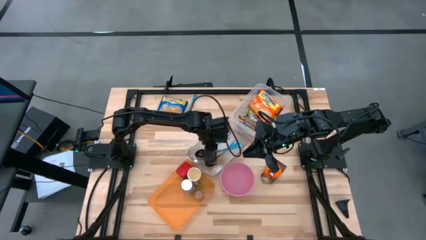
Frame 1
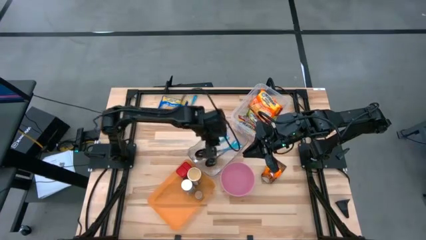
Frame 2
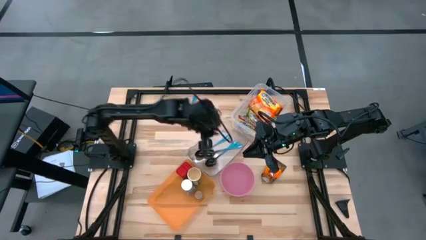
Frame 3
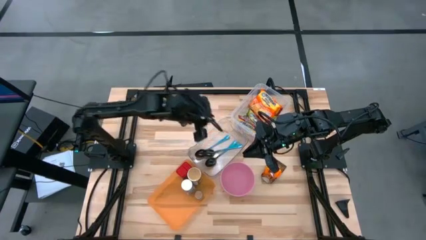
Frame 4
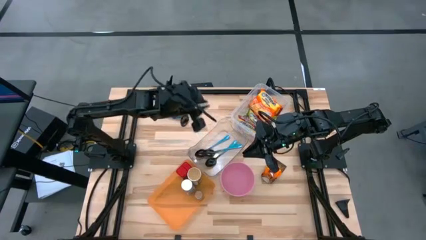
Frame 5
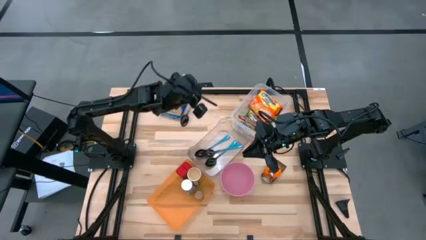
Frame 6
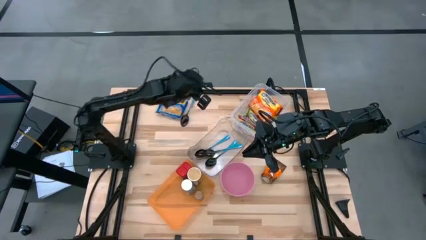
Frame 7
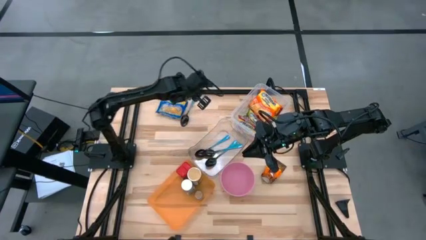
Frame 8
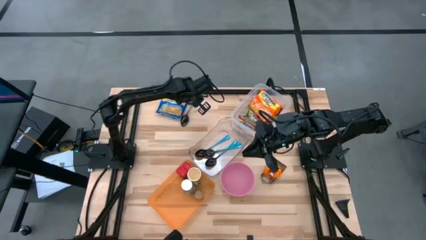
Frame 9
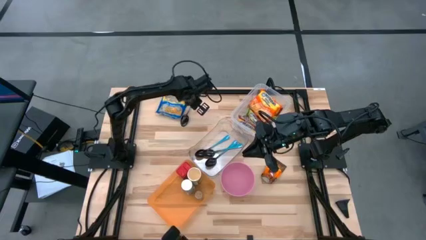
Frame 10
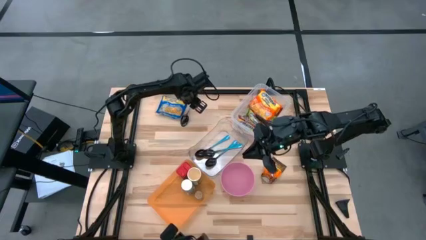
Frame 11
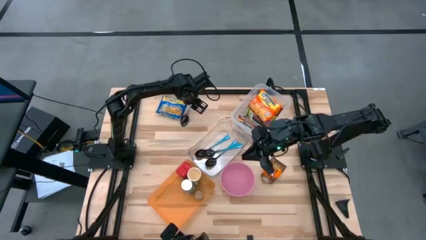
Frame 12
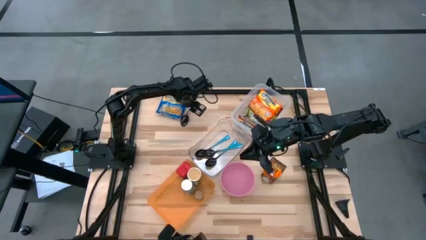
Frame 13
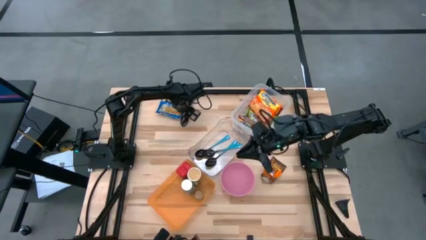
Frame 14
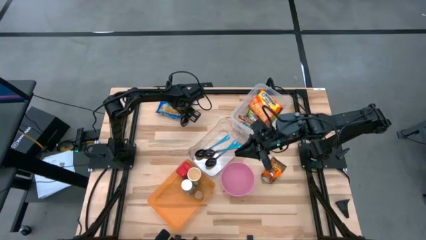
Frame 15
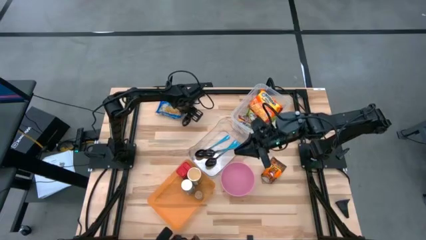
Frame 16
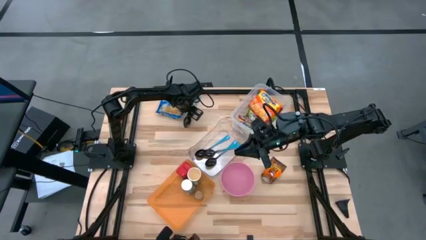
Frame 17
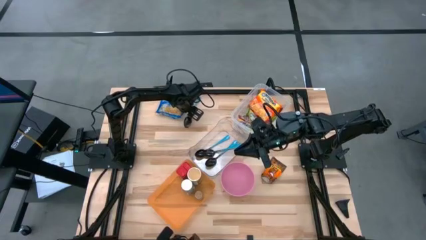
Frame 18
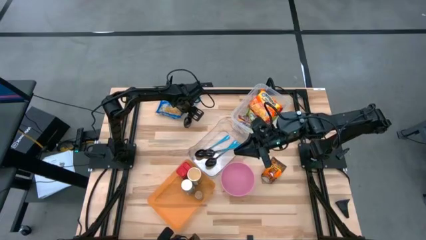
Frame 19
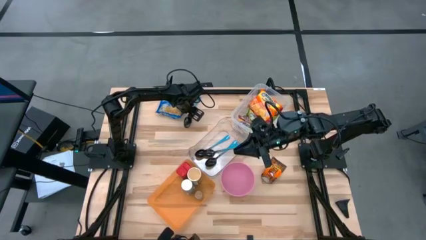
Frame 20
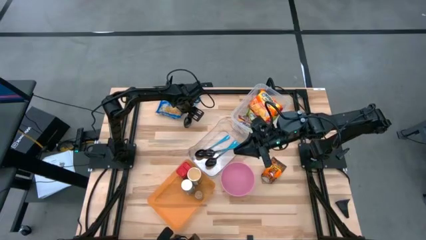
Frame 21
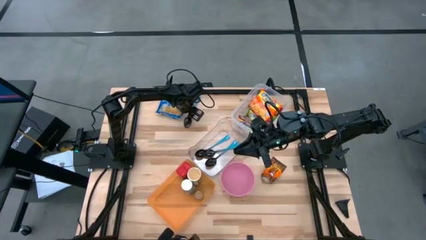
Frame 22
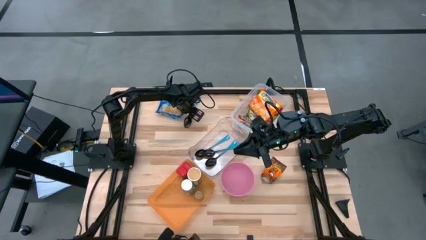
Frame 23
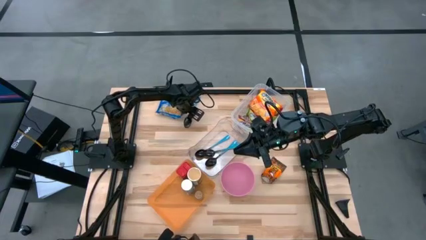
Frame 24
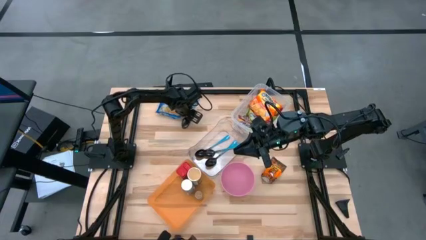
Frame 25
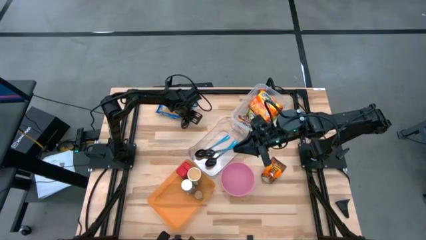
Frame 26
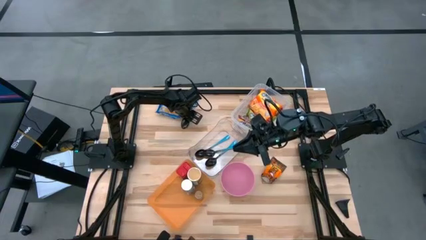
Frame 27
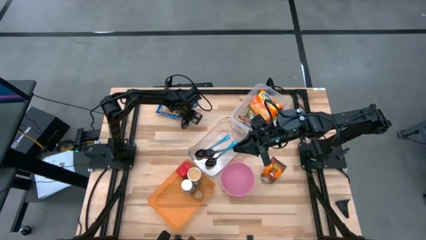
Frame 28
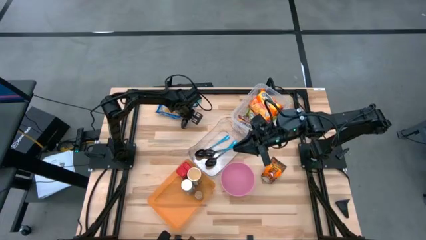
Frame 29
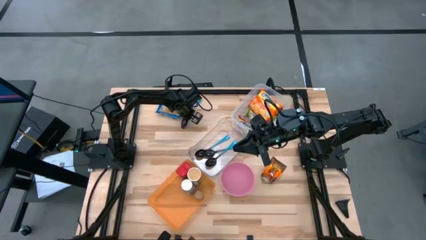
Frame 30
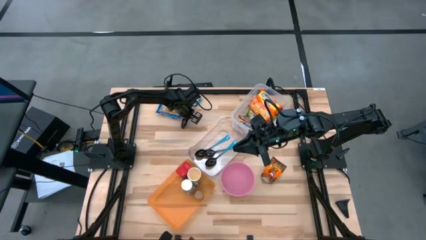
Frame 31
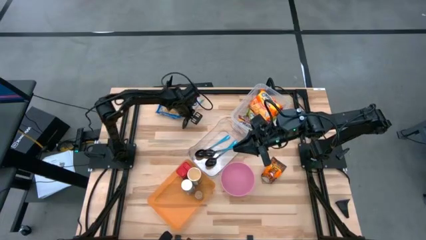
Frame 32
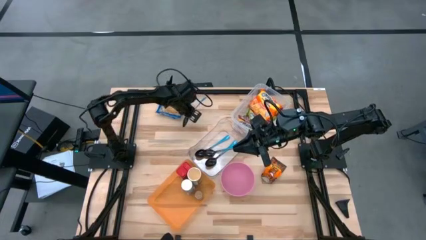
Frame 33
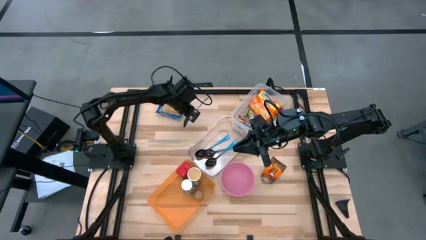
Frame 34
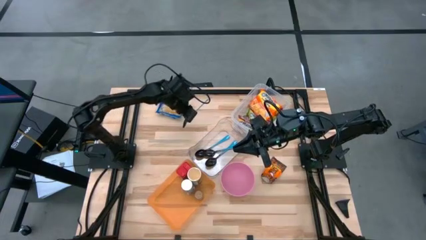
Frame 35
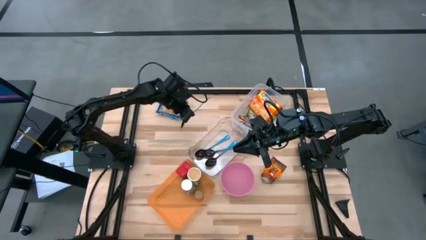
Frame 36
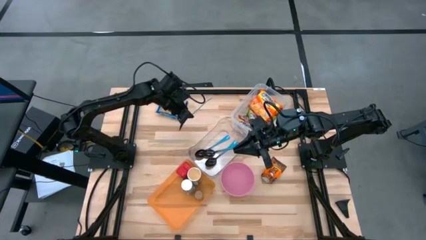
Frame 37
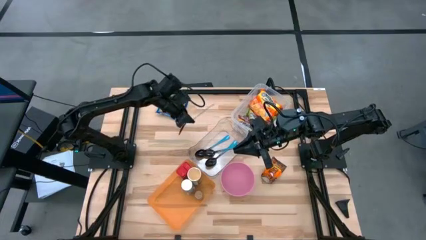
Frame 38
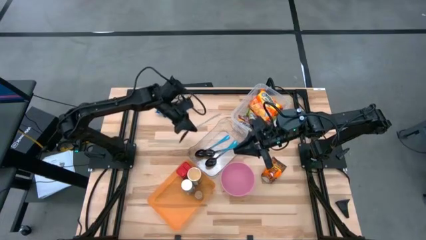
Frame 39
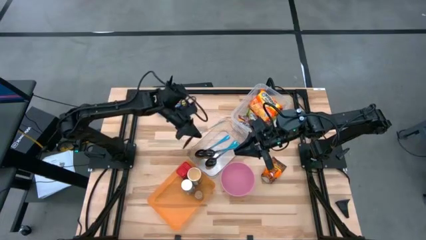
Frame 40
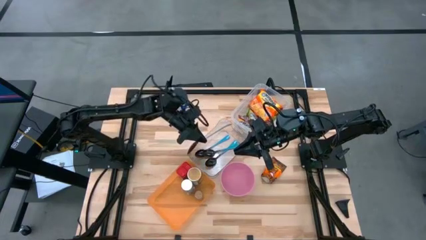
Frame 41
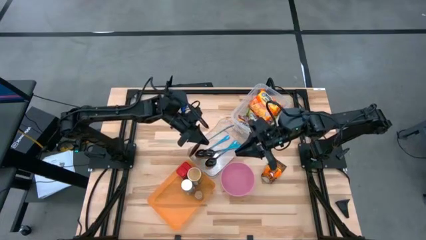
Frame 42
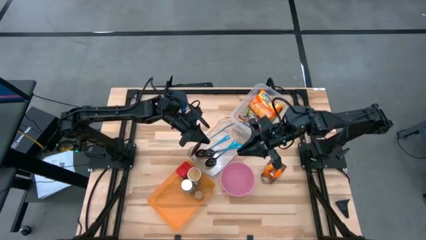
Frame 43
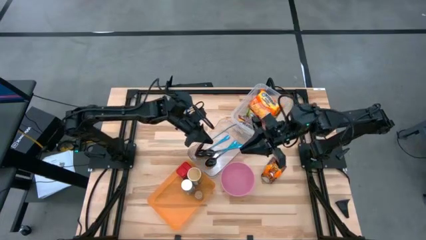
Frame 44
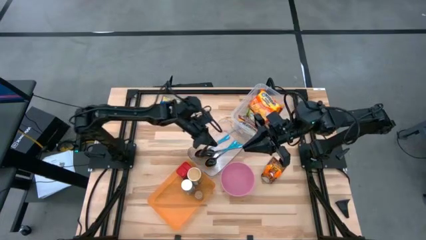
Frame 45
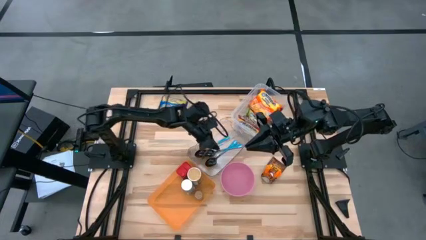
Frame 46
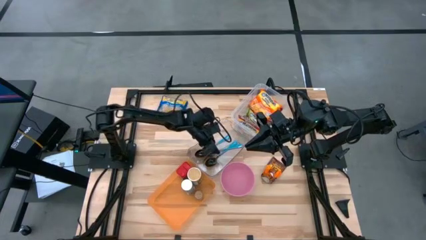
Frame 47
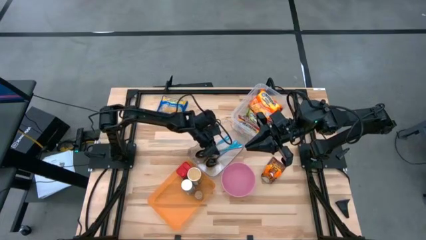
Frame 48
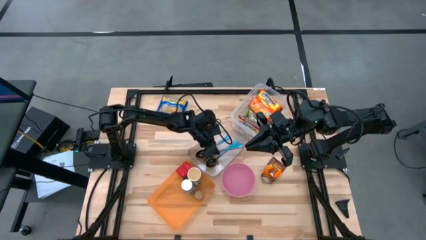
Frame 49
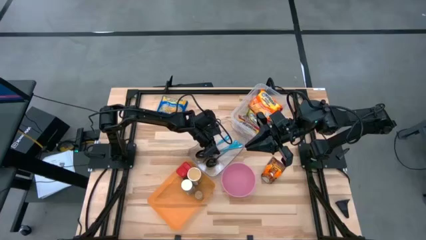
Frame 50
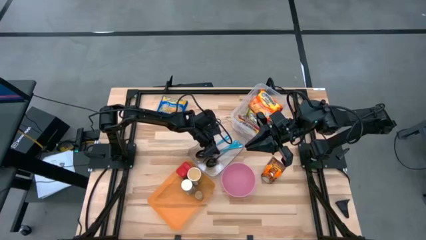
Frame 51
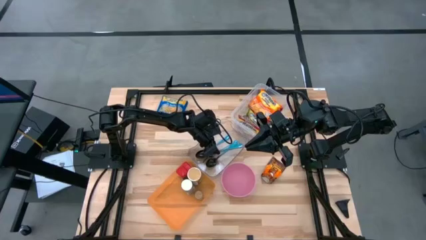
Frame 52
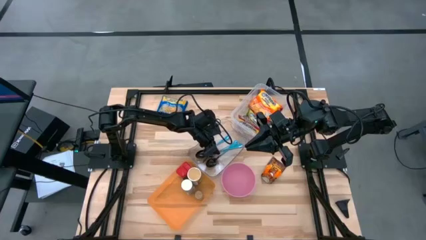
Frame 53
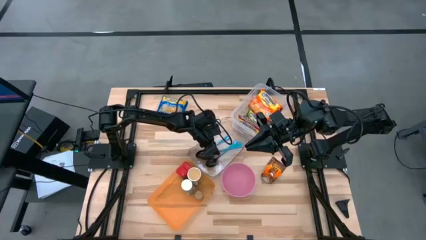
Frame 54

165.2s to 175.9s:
Task: Pick & Place Food Item
Put the blue spoon into the transparent bin

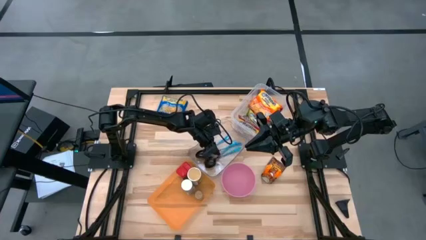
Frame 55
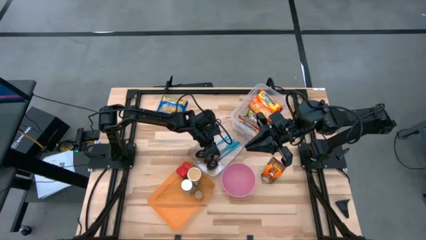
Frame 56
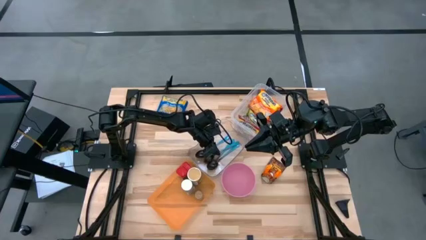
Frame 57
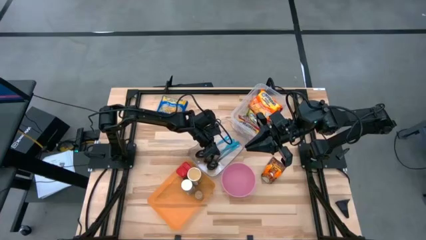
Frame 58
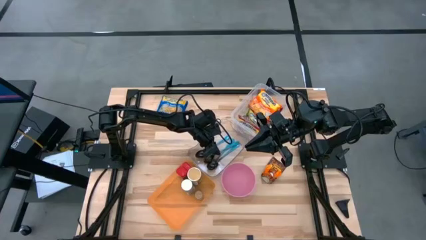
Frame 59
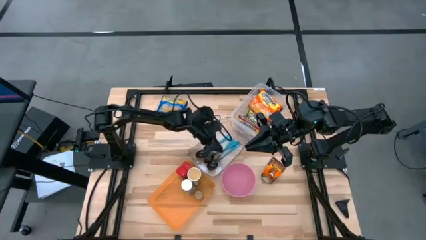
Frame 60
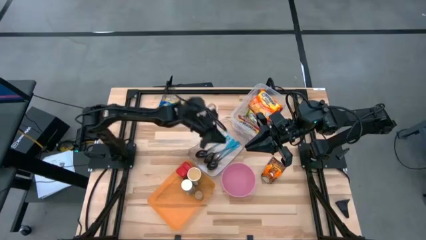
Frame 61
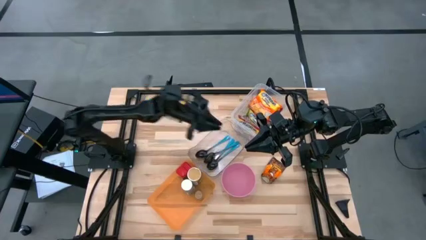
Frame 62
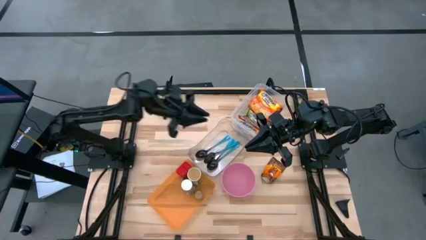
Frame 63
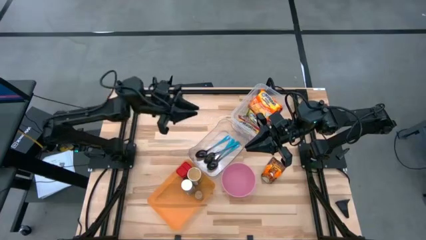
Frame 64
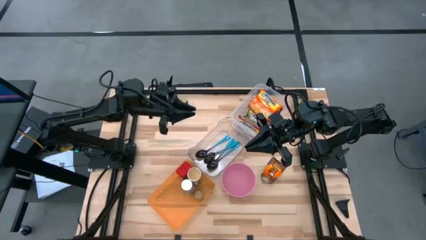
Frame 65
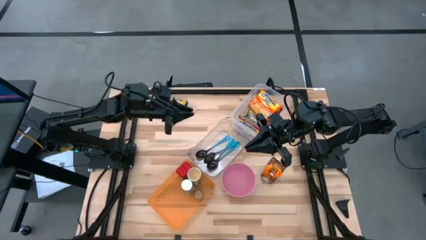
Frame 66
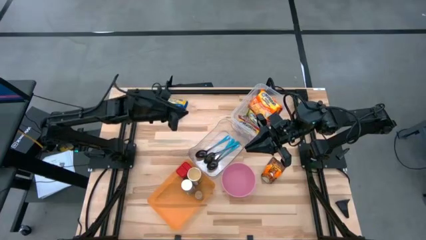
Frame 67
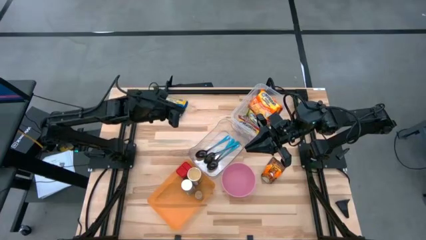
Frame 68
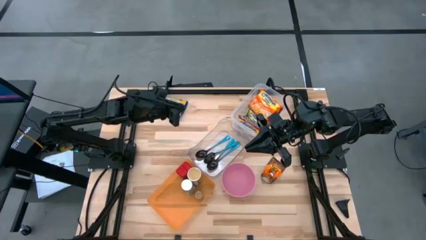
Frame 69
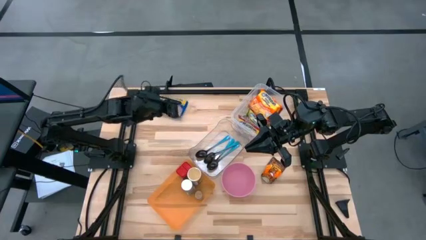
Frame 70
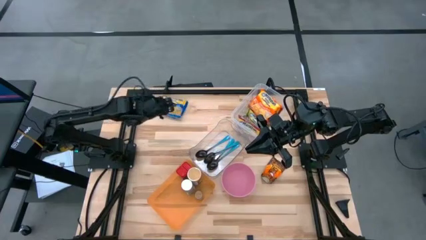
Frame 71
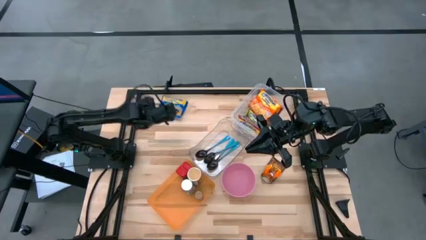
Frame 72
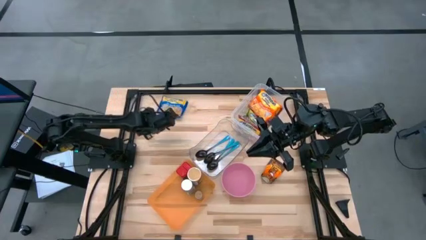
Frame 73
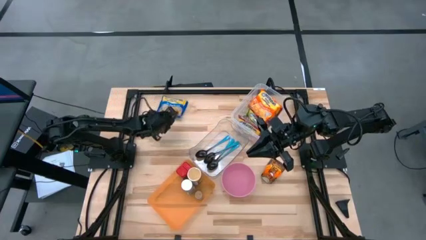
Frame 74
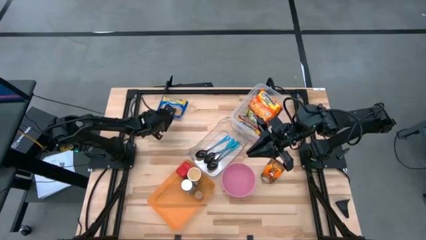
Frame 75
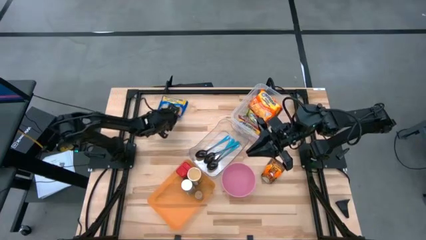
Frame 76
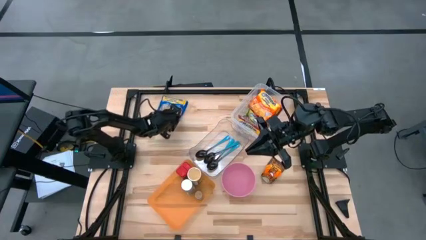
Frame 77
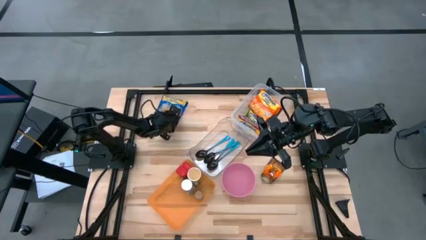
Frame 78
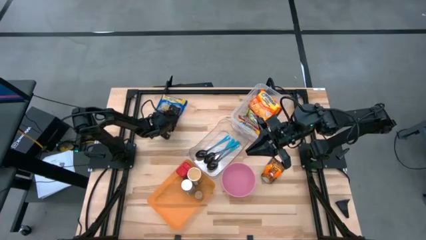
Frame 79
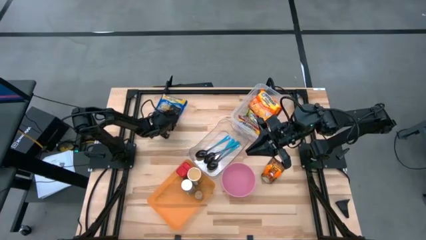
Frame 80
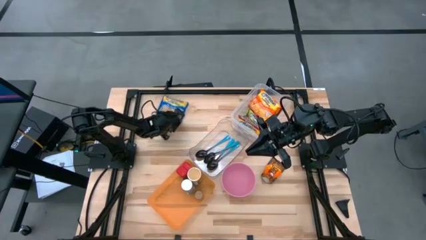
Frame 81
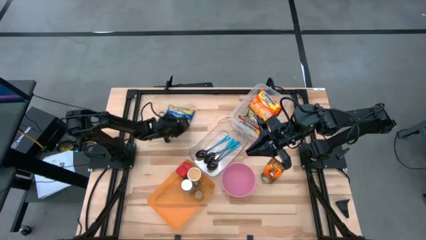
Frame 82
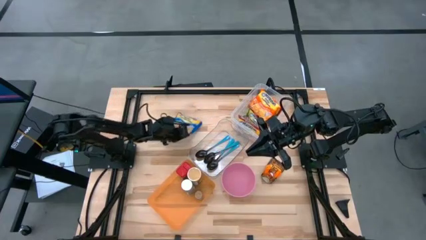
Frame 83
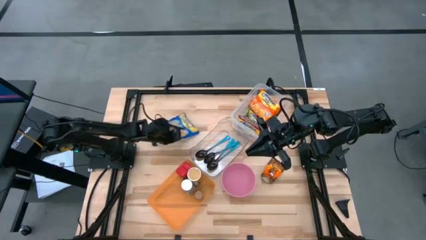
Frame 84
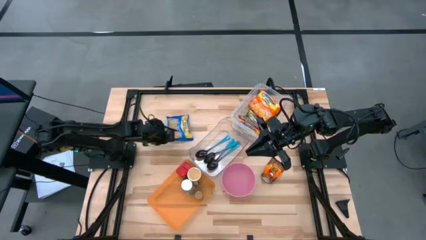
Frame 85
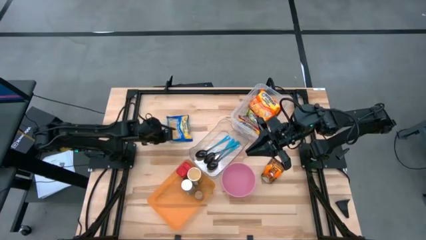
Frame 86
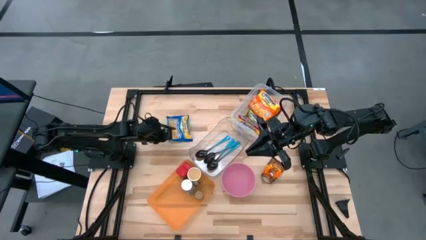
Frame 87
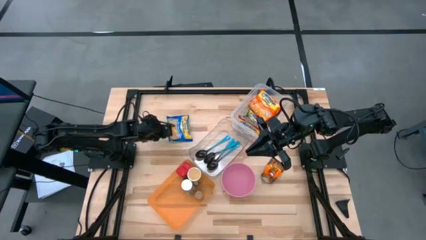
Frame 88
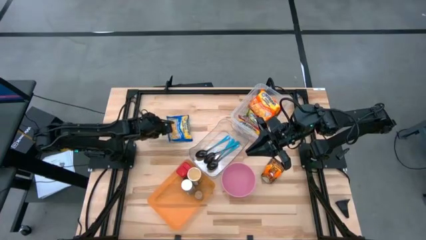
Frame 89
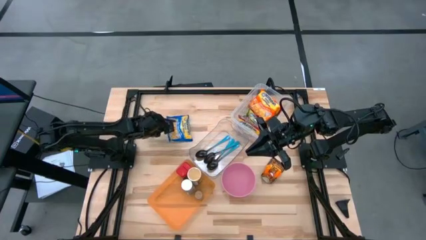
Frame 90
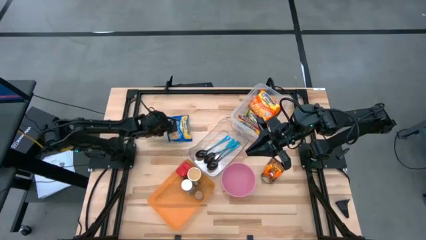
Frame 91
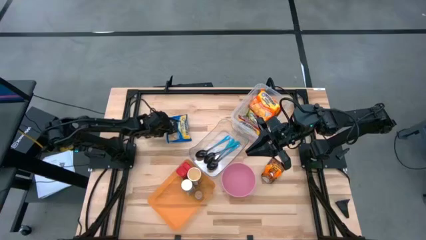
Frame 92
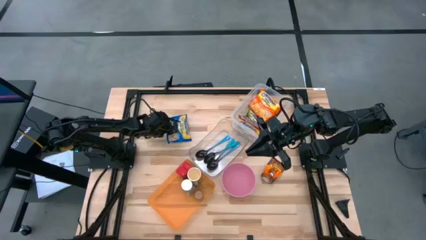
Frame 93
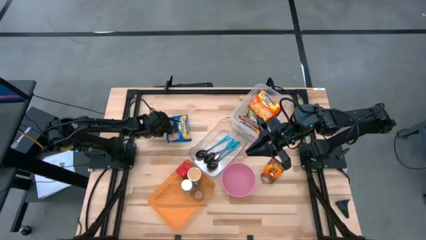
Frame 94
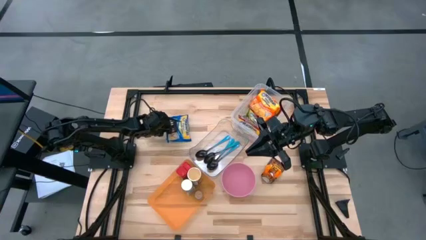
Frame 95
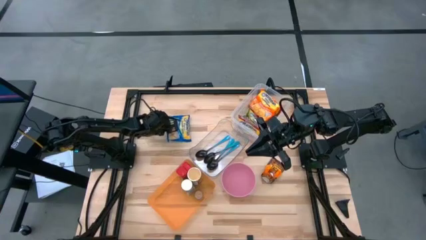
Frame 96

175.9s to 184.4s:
Put the blue noodle pack into the transparent container
